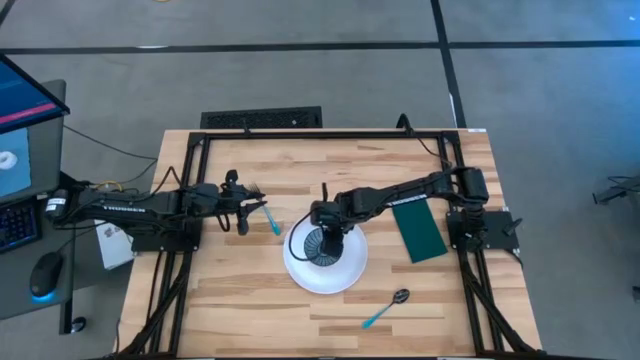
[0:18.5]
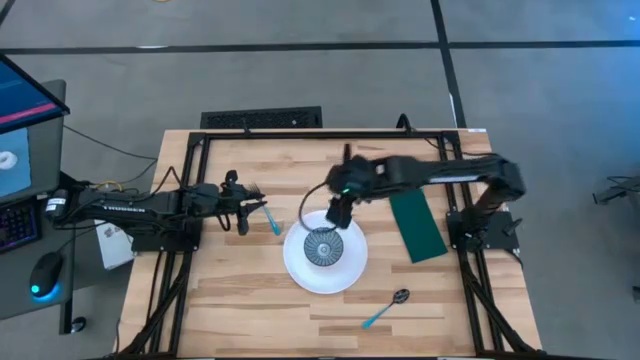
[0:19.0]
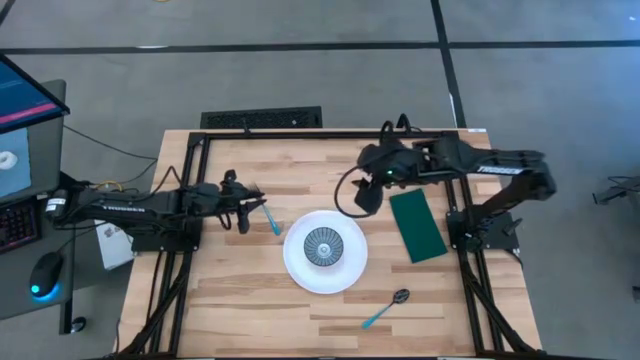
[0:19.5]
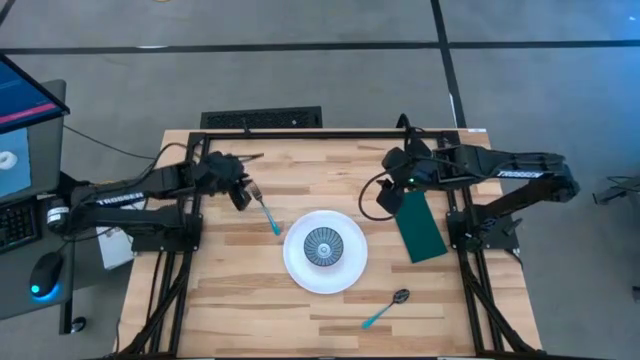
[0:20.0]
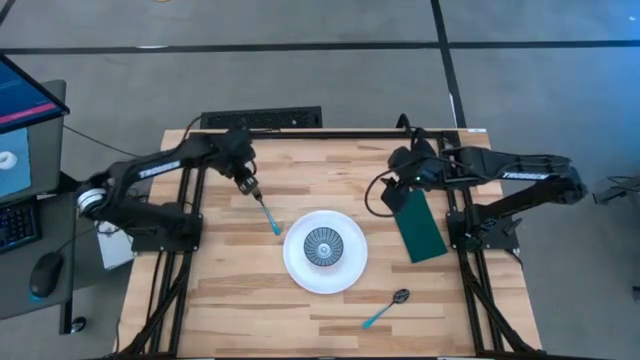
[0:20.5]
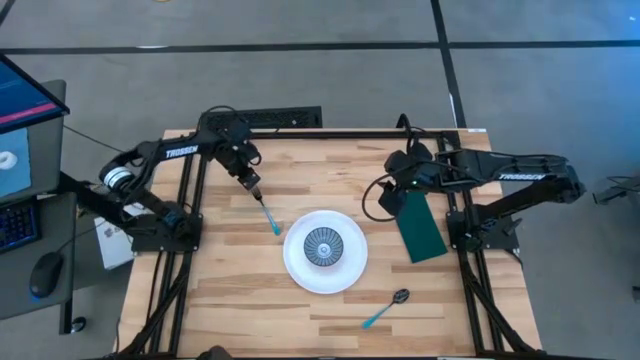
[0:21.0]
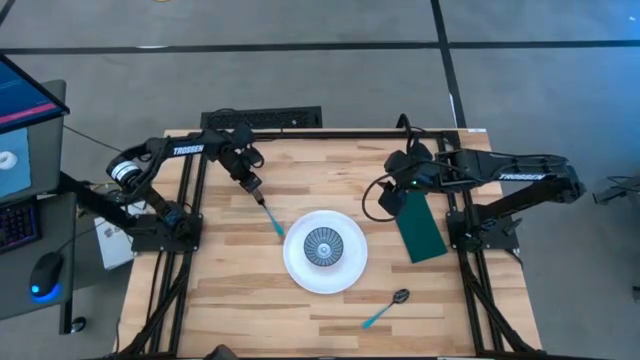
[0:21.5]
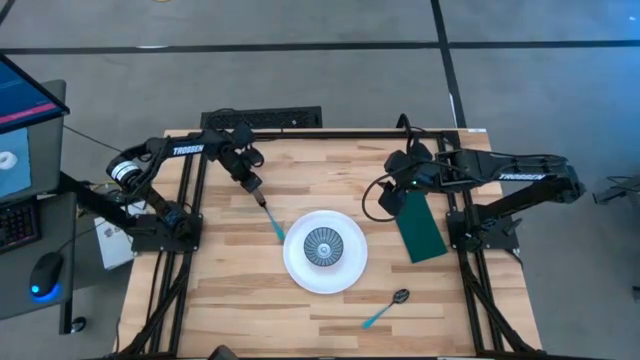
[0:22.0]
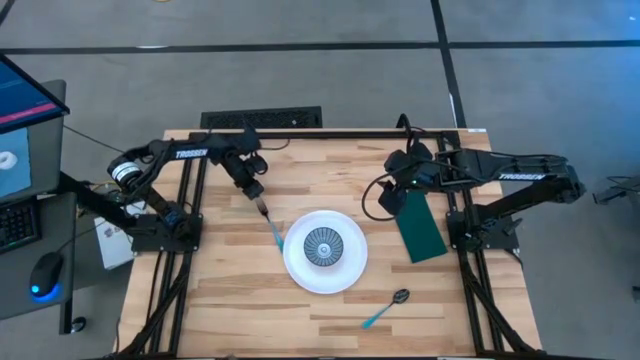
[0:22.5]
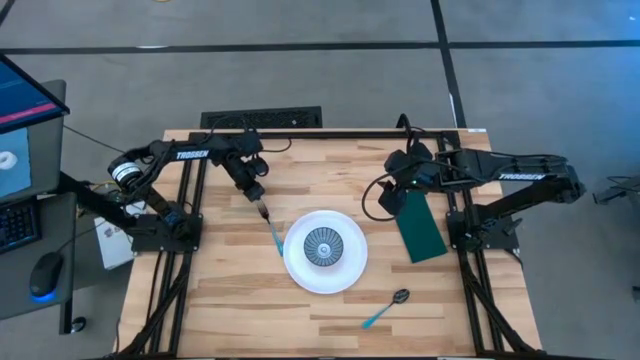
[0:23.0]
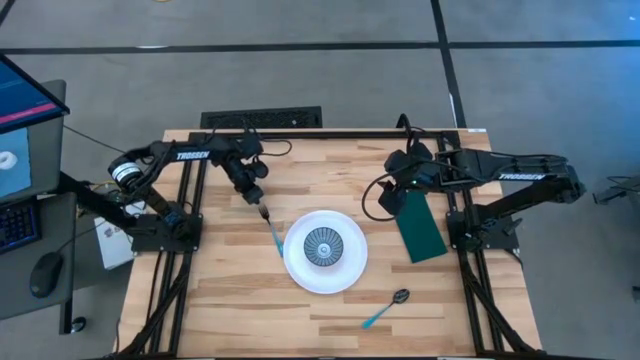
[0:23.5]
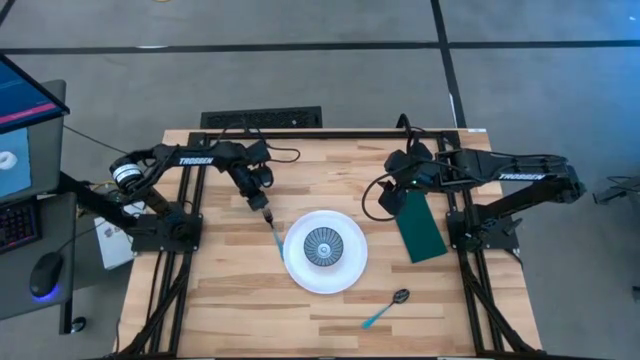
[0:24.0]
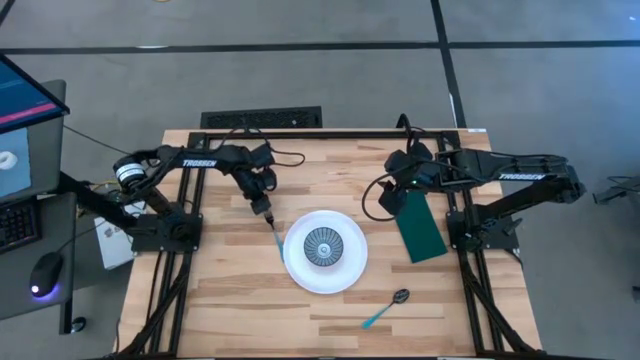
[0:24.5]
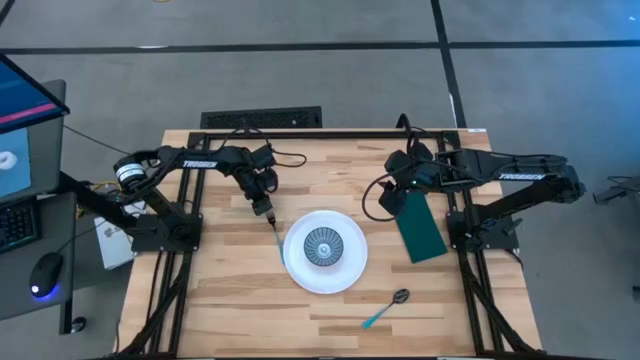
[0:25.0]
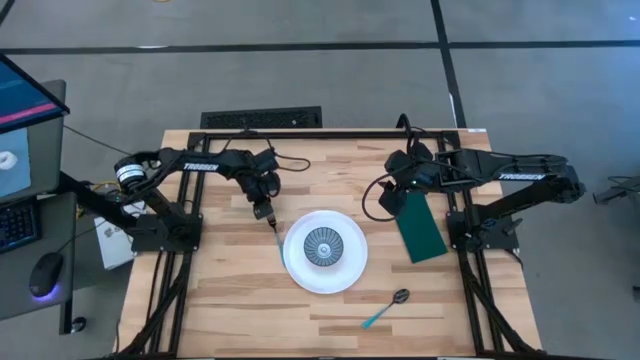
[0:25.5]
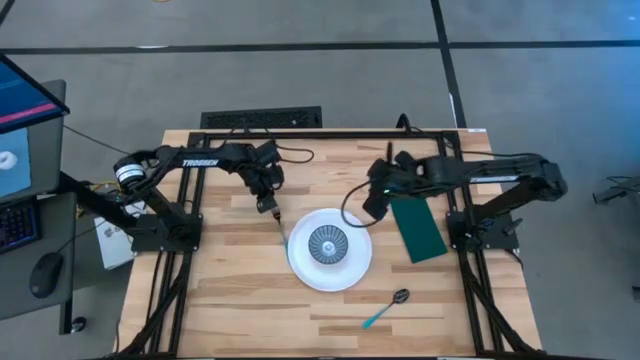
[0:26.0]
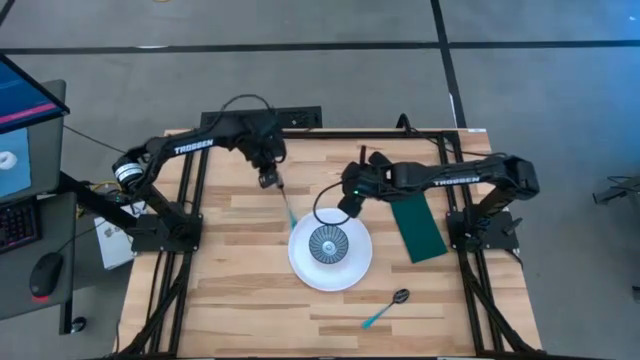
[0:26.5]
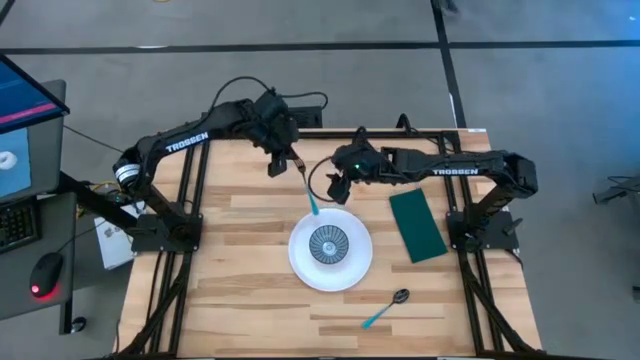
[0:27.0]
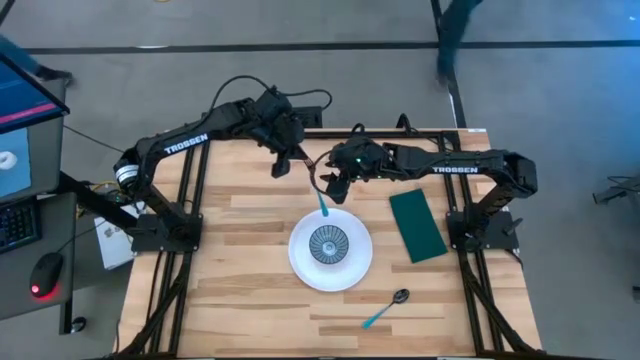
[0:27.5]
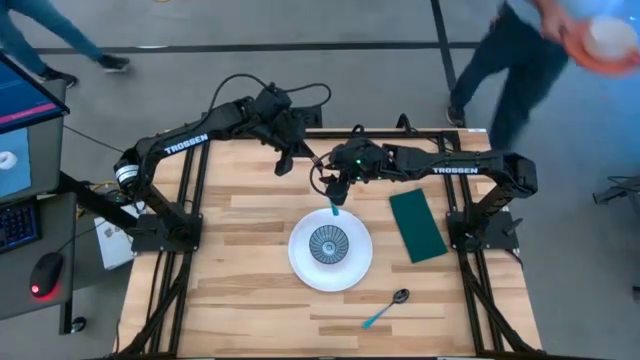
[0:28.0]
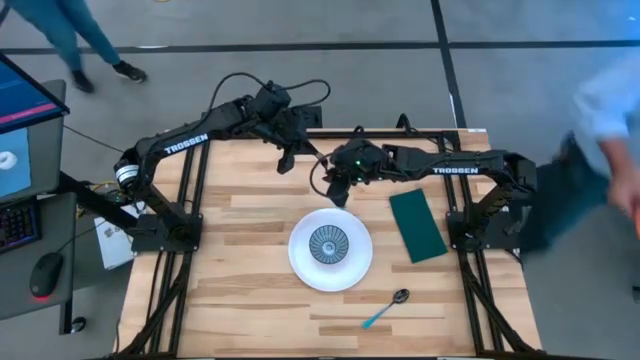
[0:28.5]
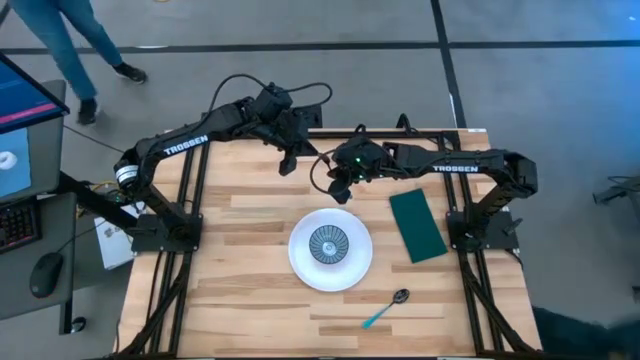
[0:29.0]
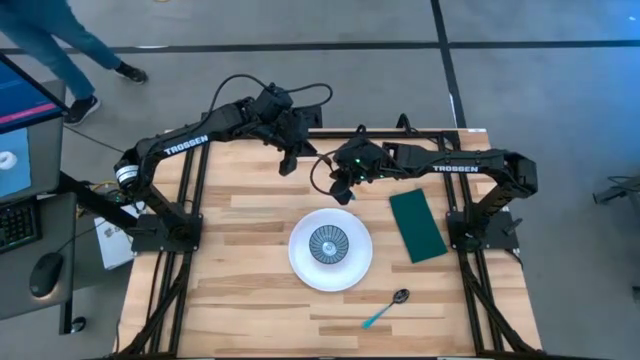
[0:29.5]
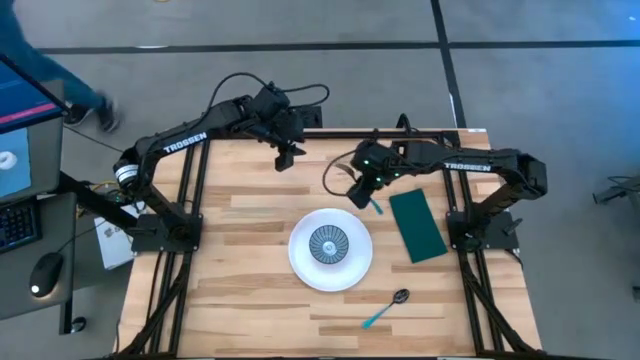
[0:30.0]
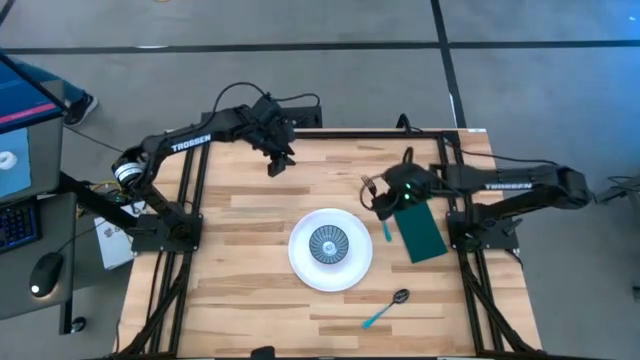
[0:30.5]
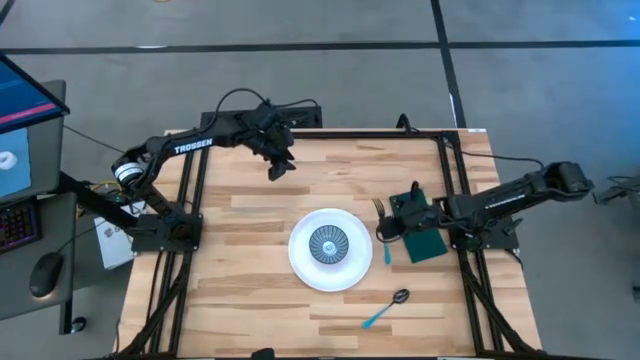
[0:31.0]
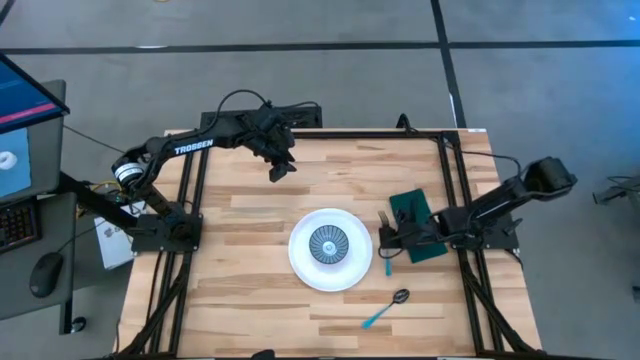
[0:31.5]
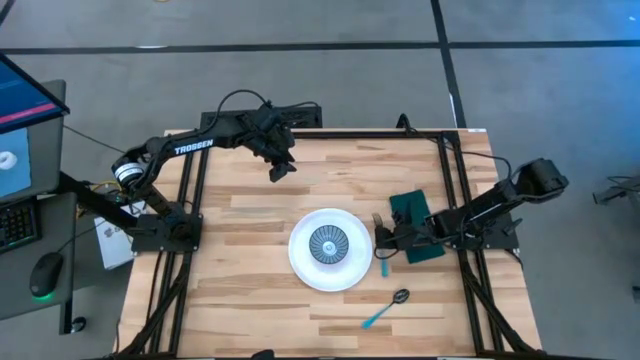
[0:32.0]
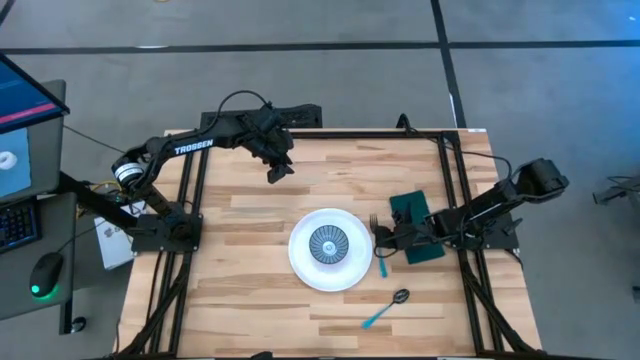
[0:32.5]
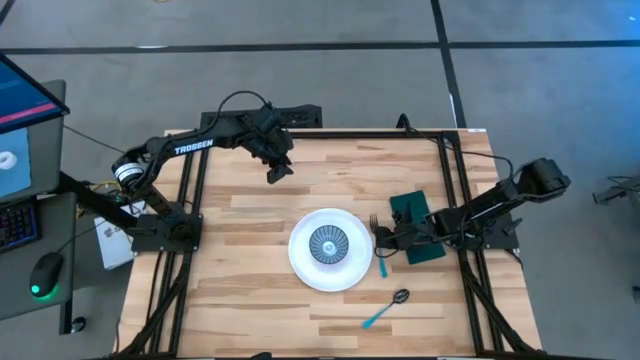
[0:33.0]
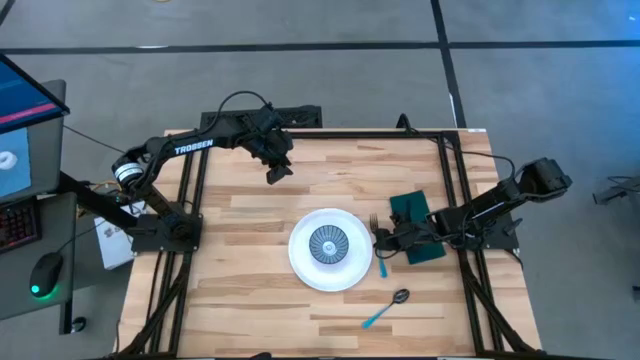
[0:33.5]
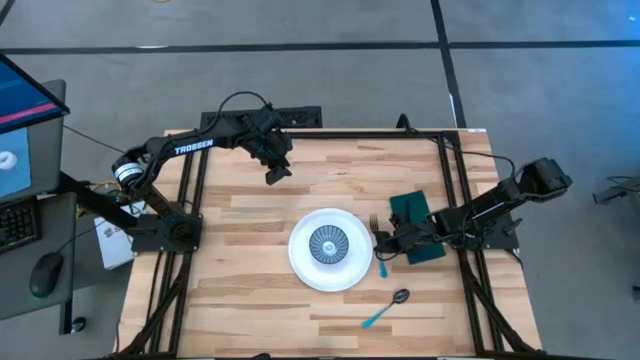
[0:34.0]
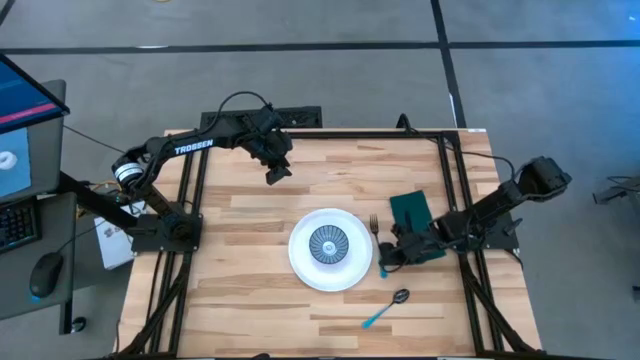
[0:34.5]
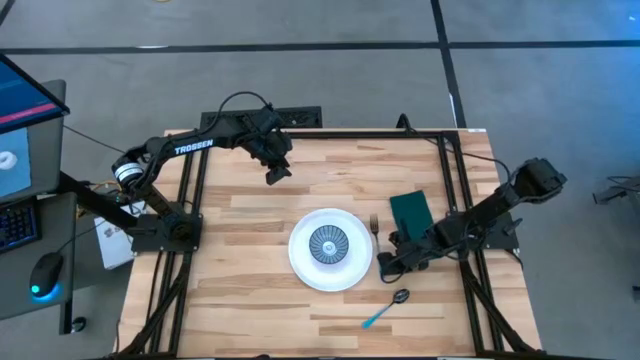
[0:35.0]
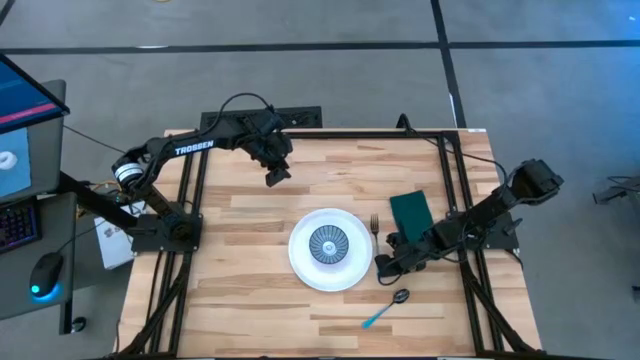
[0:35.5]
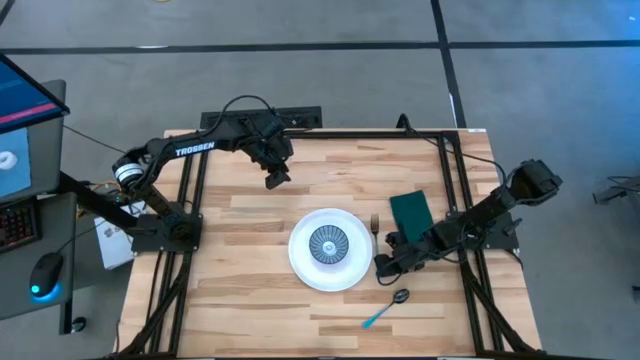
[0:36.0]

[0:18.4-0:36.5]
Task: Set table place
Put the blue fork on the right side of the white plate

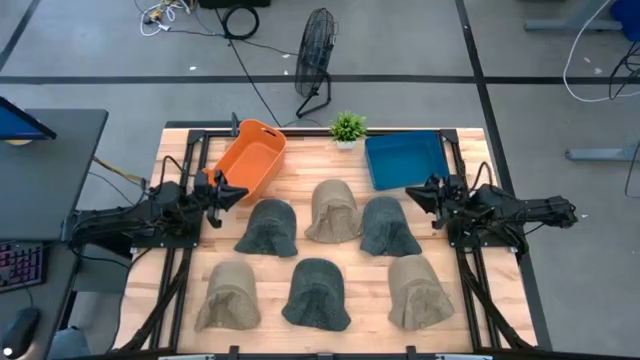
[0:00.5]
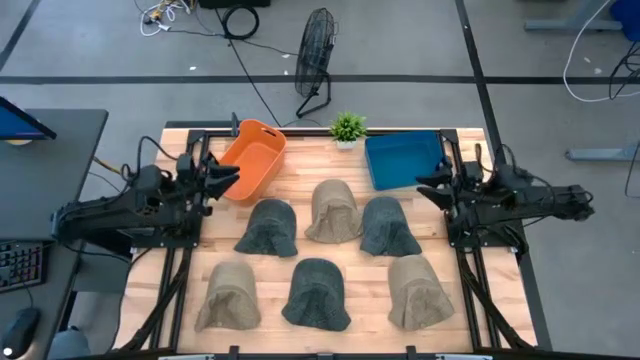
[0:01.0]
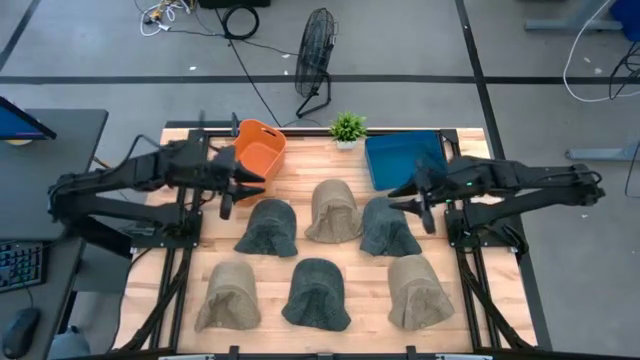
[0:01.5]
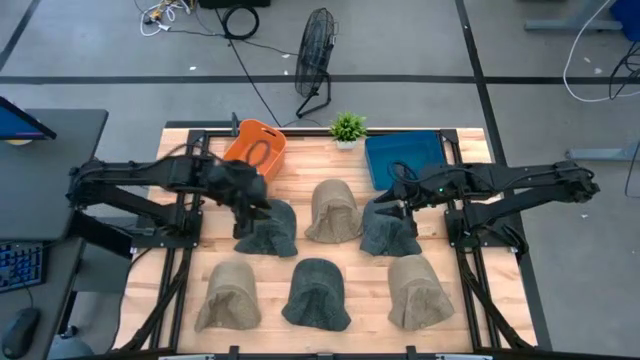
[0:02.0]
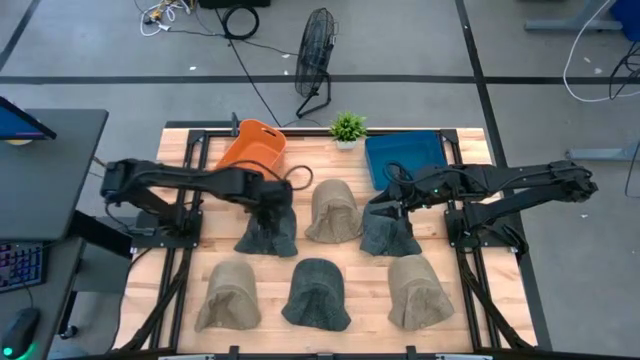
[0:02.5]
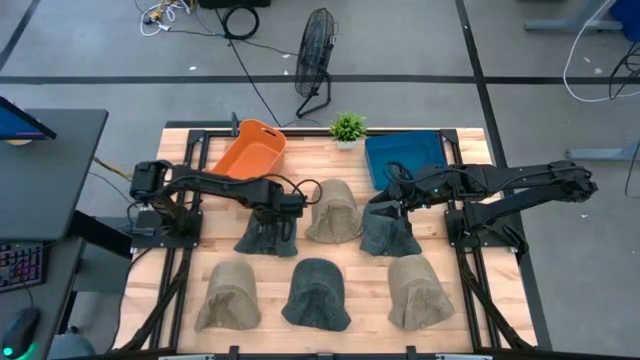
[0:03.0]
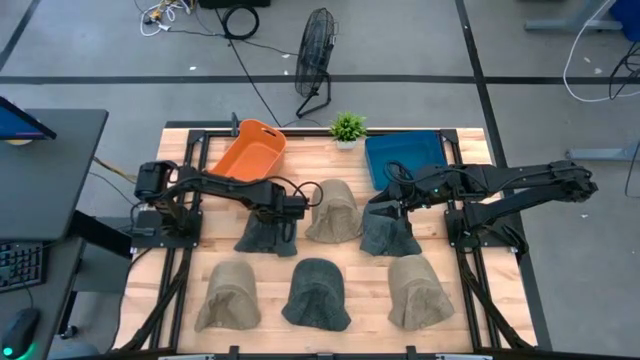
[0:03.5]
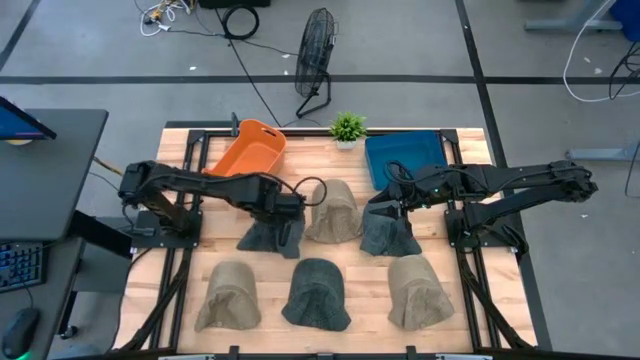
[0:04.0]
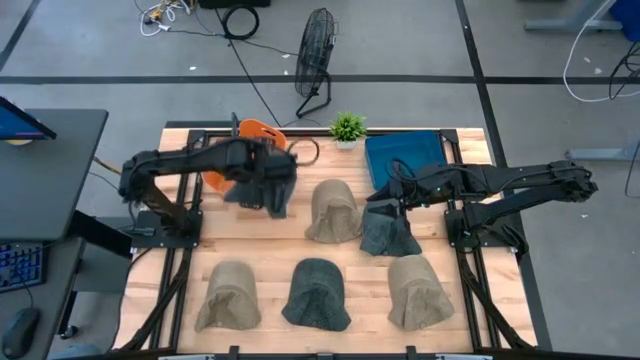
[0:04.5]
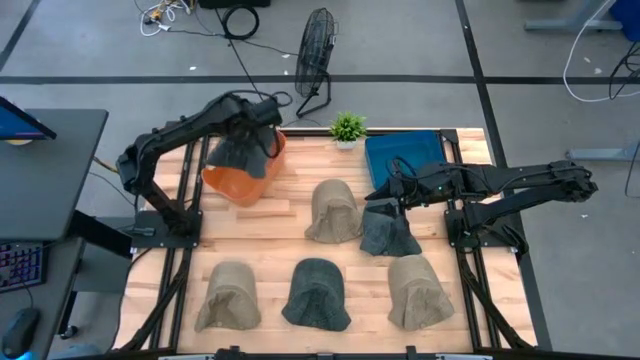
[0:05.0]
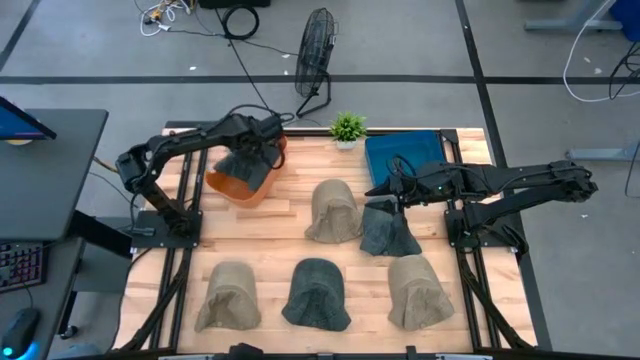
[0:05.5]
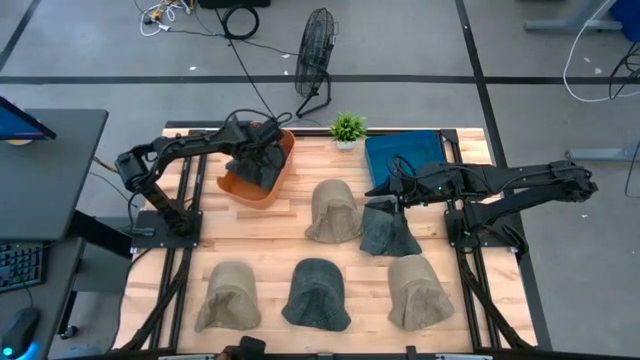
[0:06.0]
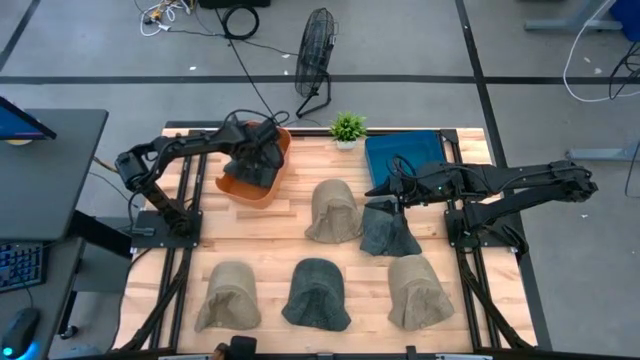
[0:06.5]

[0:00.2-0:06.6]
Task: Pick & Place hat
Put the top left black cap into the orange bin
